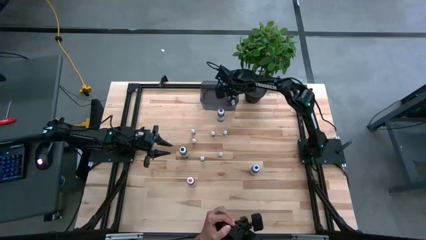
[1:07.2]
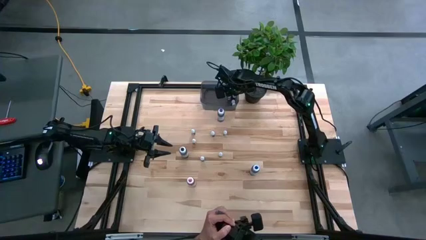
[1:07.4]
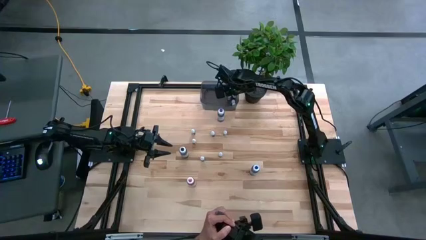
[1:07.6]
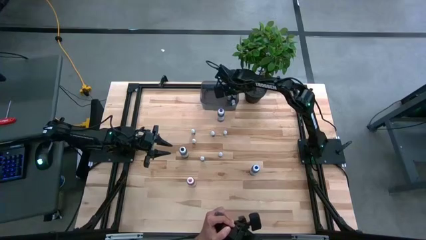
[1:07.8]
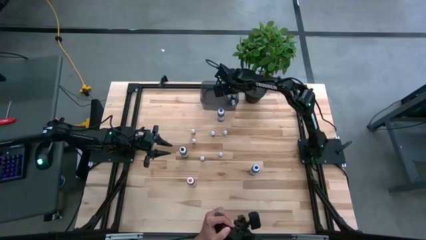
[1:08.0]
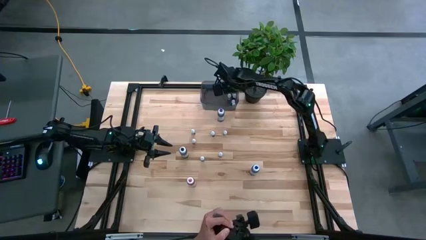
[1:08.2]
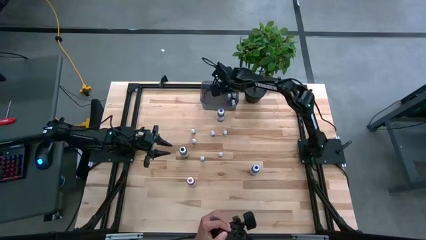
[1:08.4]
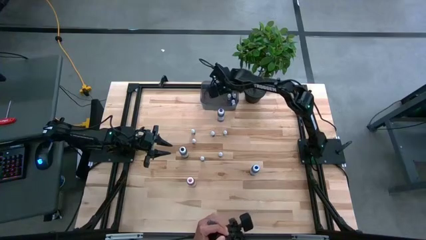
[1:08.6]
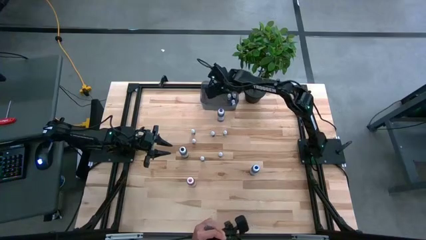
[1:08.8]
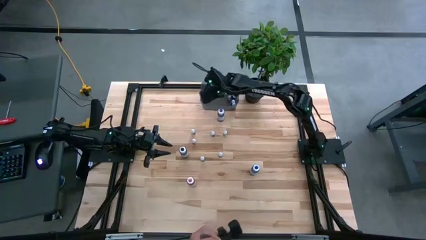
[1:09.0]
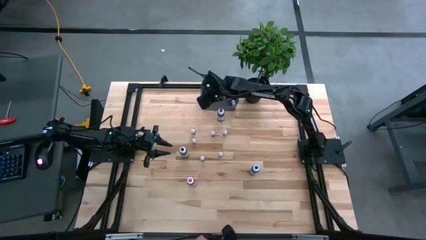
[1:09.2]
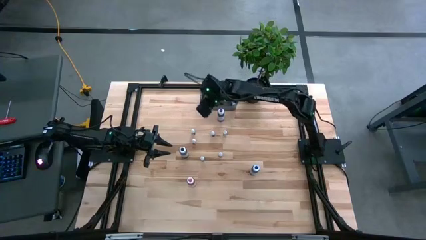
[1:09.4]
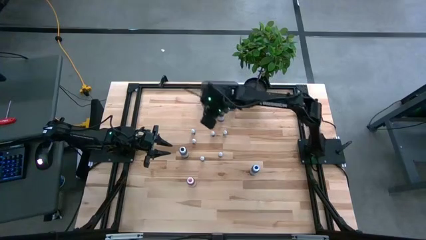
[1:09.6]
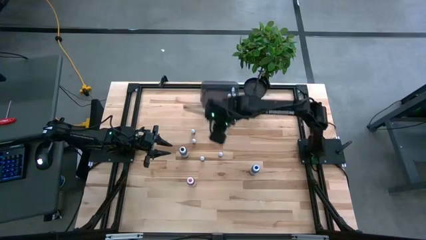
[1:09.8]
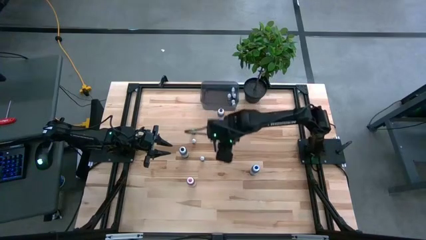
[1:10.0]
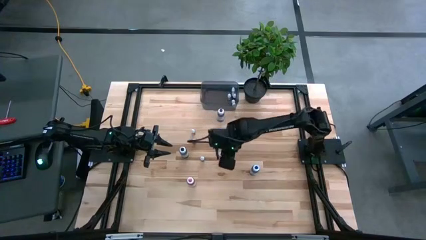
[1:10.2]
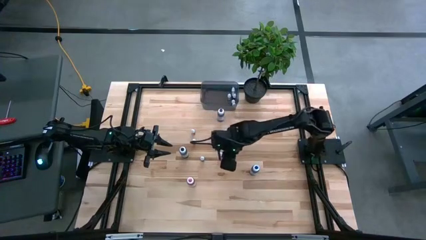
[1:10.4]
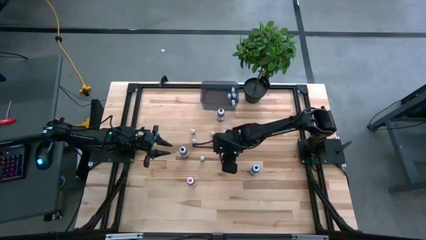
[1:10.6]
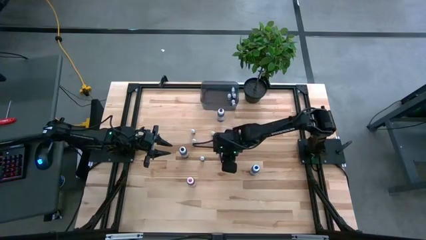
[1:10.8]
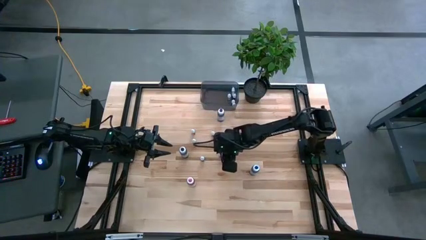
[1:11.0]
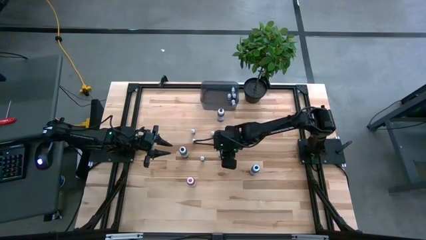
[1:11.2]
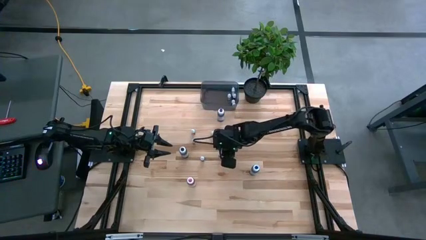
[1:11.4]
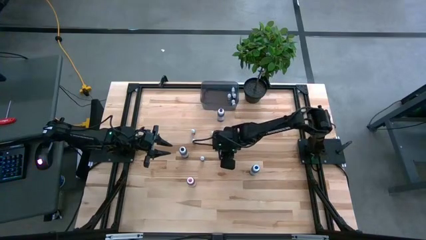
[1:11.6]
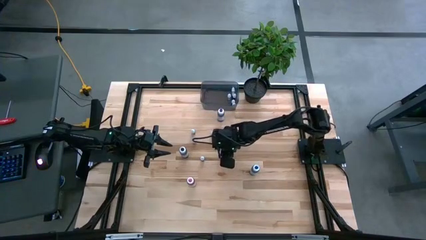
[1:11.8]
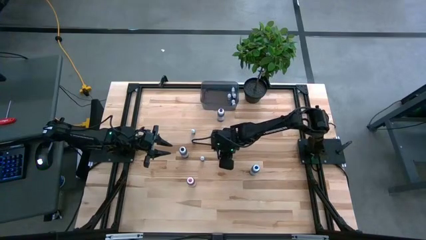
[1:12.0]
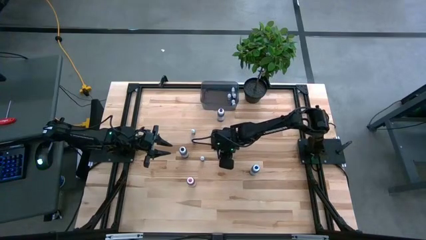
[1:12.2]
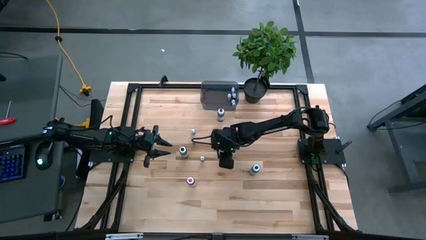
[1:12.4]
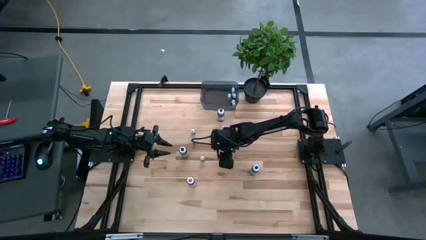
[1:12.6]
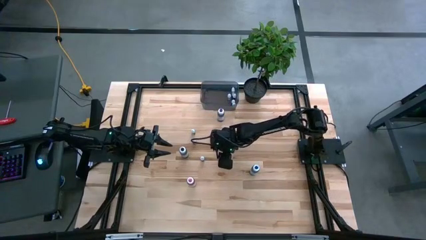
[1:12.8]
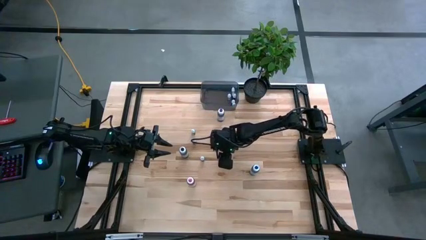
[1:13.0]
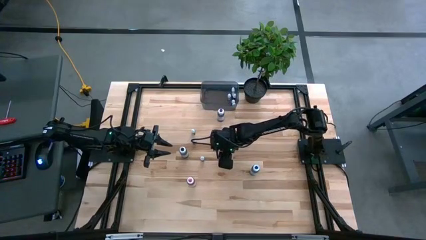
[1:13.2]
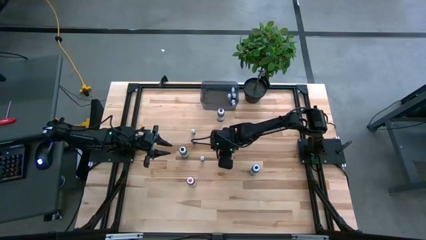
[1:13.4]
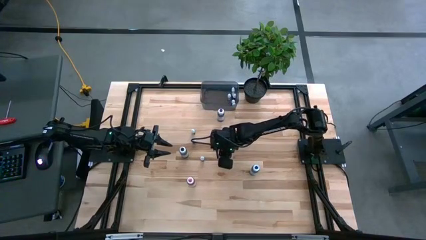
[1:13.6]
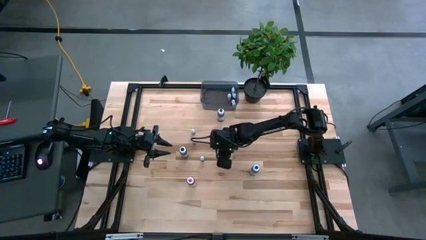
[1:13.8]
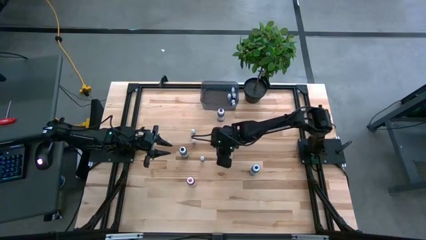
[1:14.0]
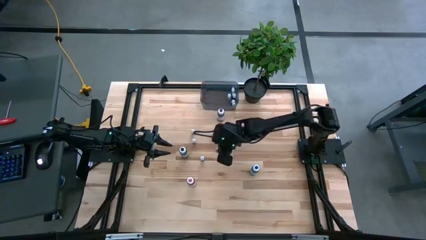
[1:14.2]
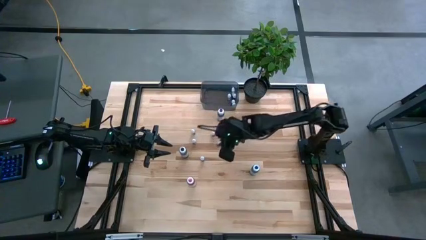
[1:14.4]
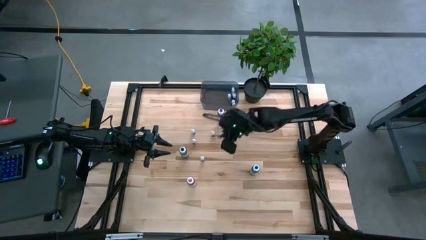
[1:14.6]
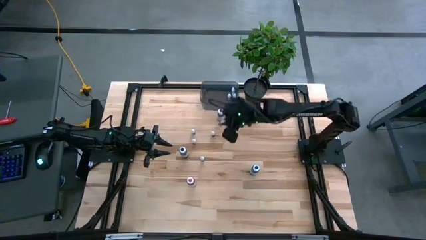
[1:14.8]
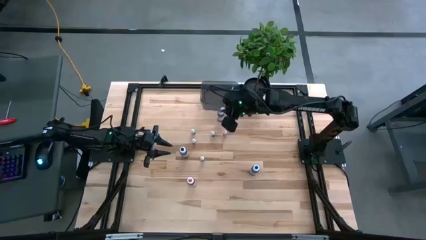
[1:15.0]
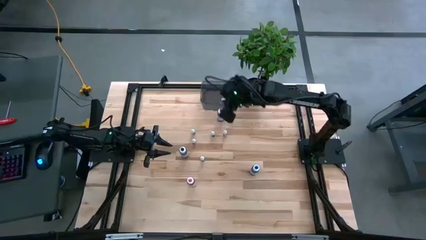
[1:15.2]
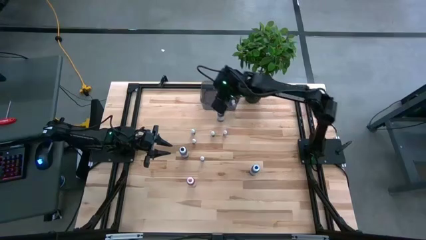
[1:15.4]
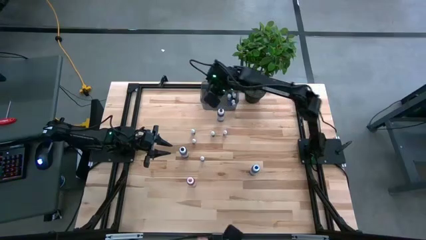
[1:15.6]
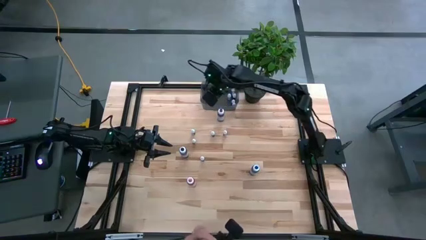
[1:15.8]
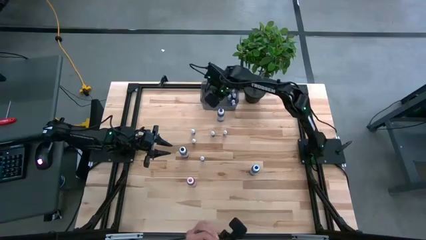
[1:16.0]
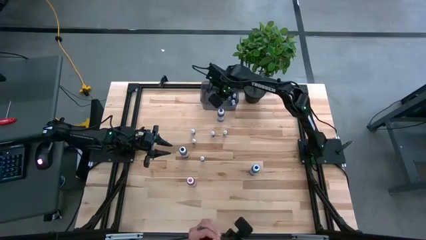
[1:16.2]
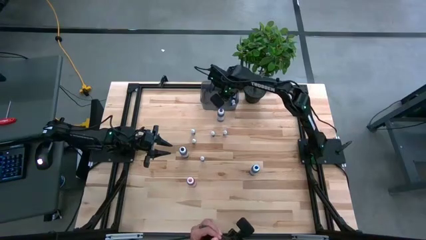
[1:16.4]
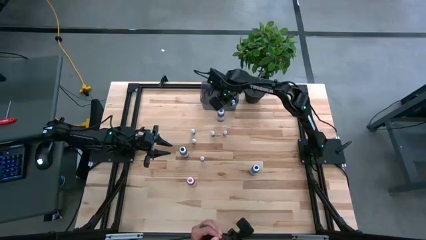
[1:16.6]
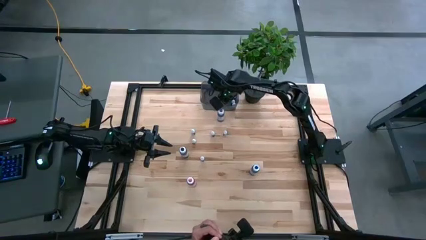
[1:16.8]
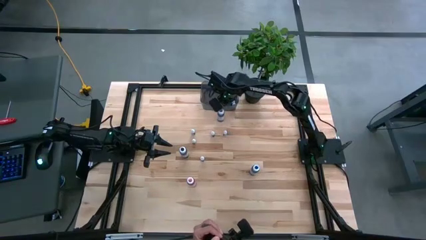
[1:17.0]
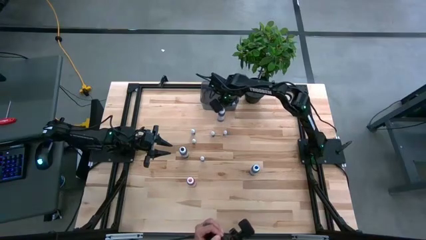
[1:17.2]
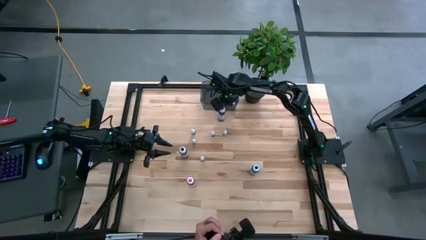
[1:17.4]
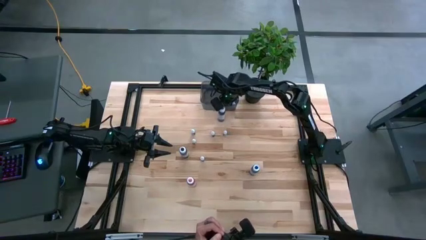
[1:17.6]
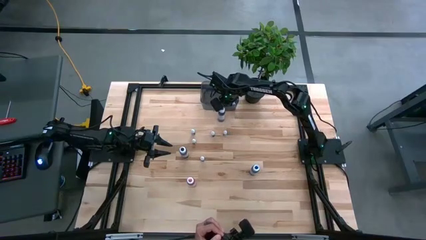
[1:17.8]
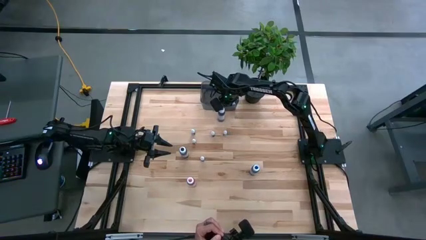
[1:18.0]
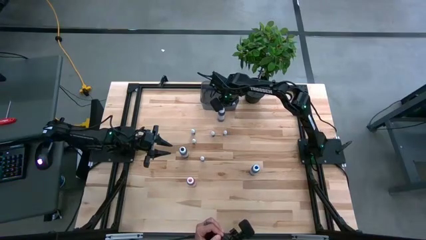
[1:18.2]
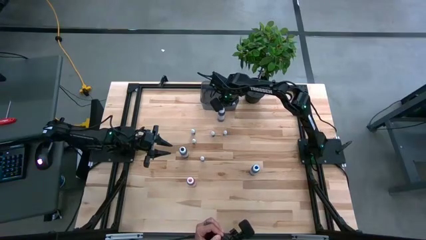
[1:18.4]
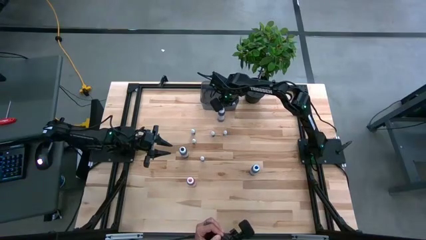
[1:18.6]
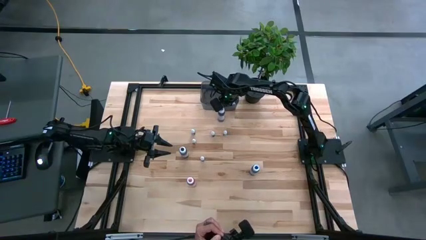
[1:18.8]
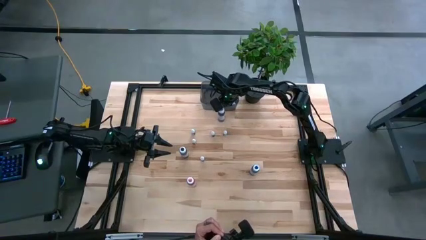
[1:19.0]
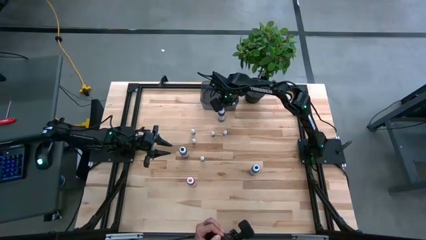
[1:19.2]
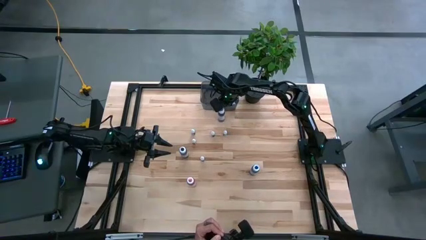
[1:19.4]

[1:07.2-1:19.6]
Task: Pick & Place food coloring
Put the bottom small green food coloring bottle into the black bin
